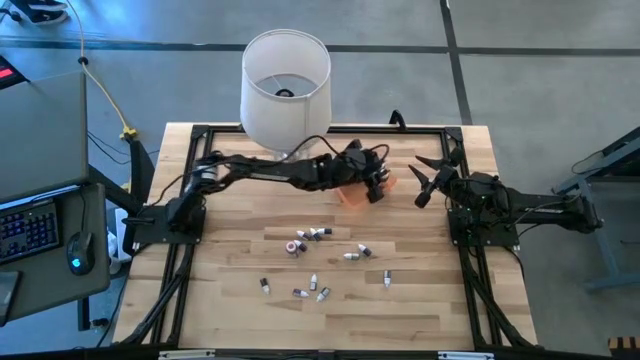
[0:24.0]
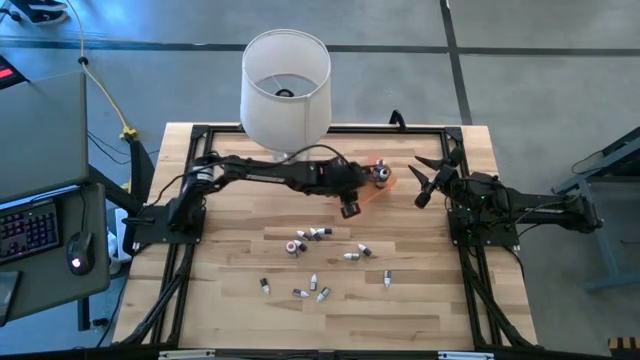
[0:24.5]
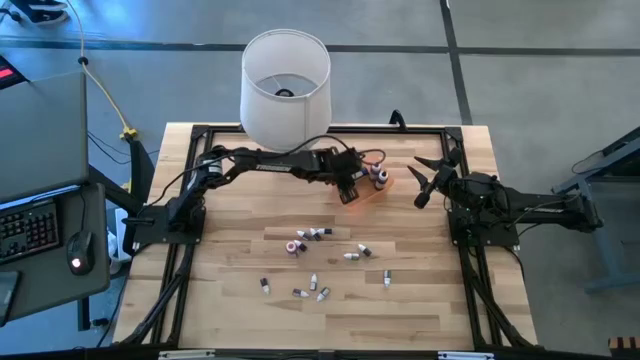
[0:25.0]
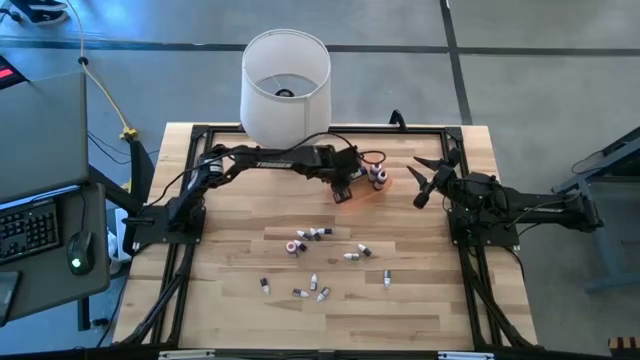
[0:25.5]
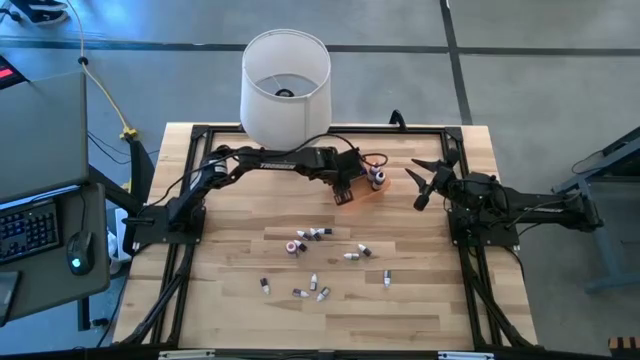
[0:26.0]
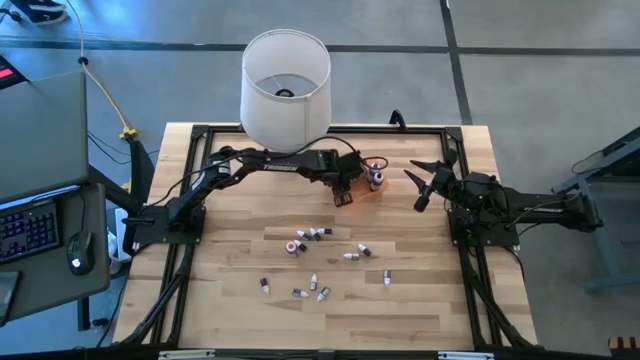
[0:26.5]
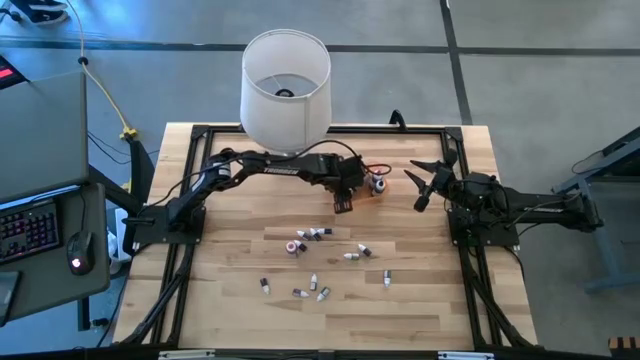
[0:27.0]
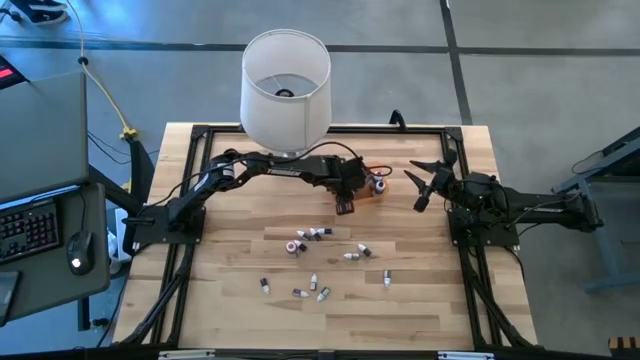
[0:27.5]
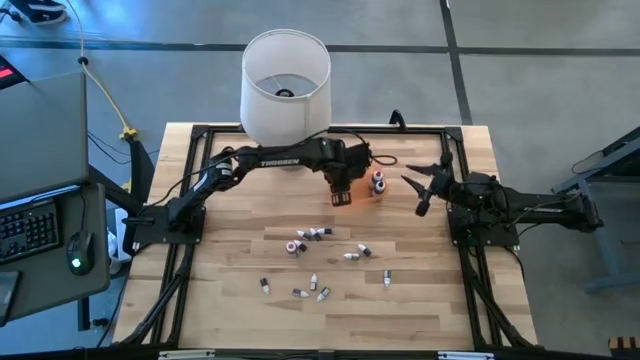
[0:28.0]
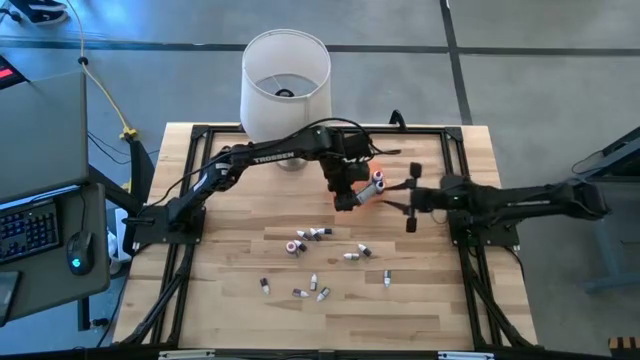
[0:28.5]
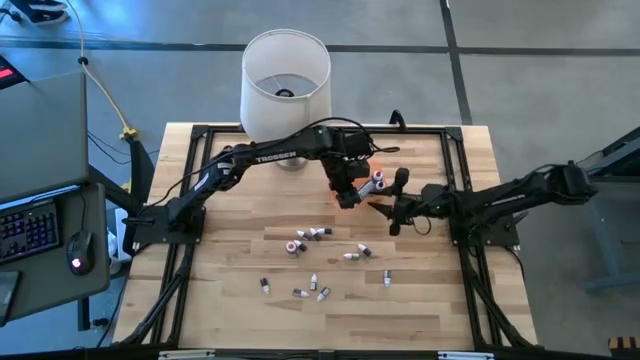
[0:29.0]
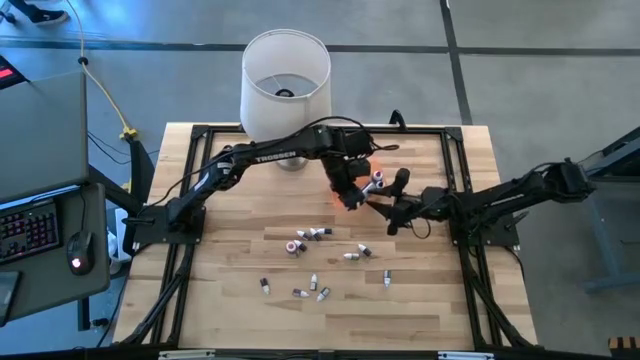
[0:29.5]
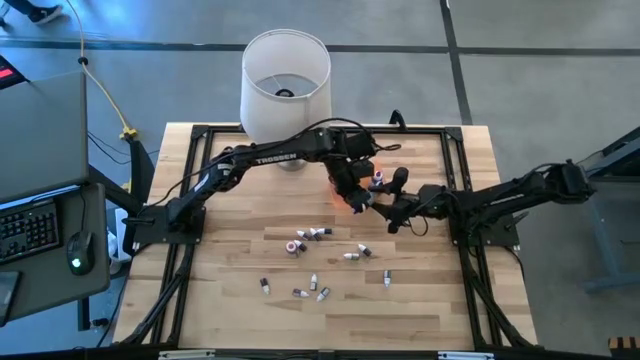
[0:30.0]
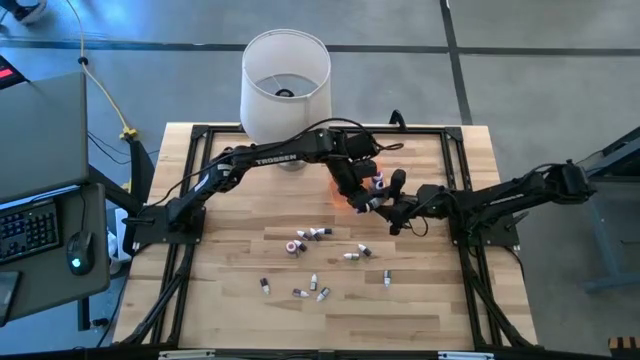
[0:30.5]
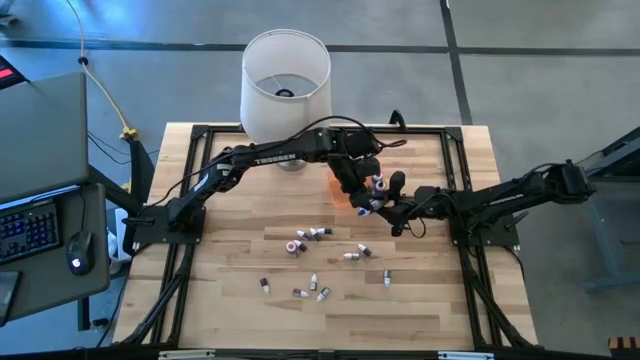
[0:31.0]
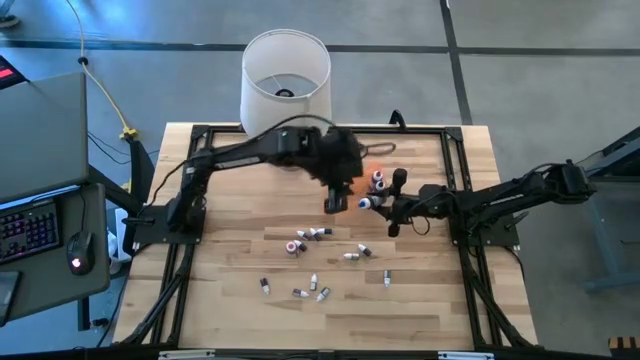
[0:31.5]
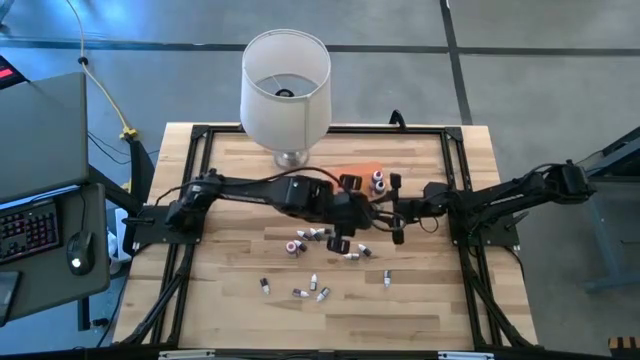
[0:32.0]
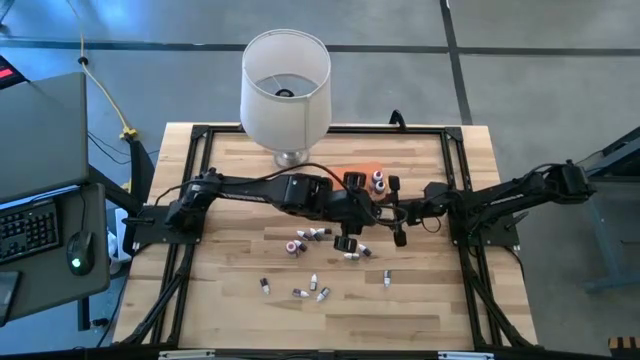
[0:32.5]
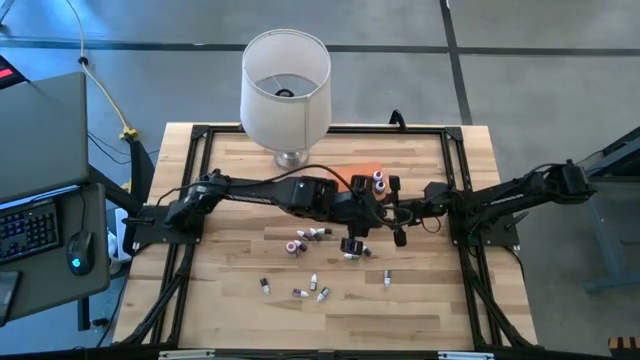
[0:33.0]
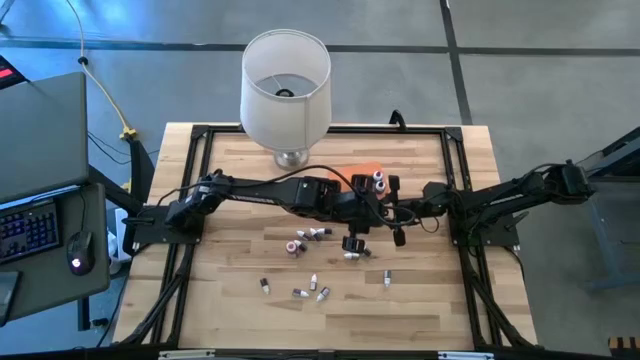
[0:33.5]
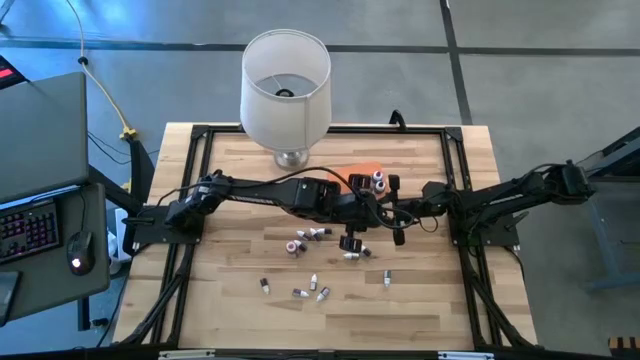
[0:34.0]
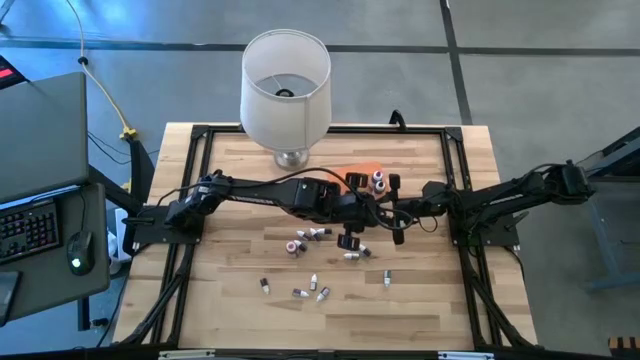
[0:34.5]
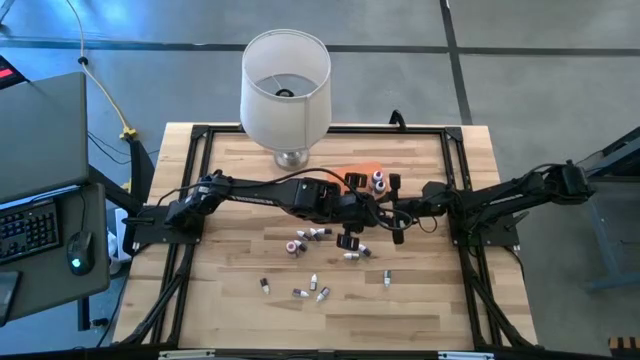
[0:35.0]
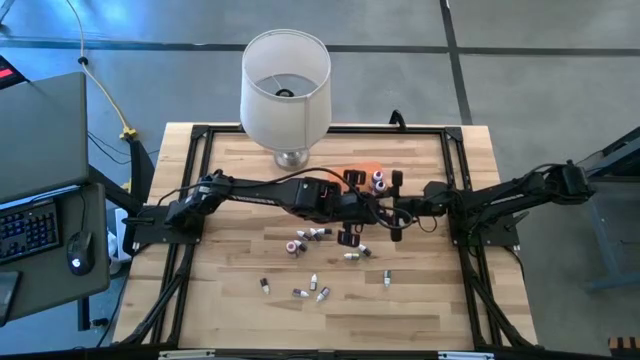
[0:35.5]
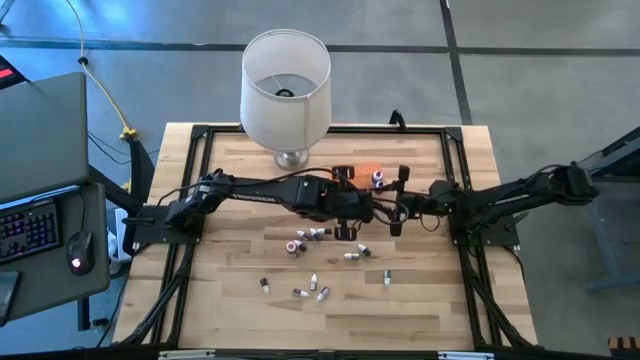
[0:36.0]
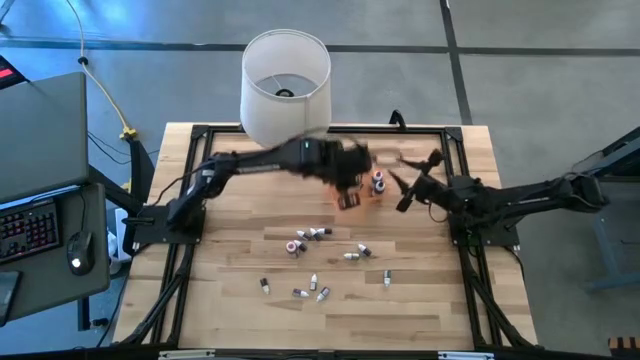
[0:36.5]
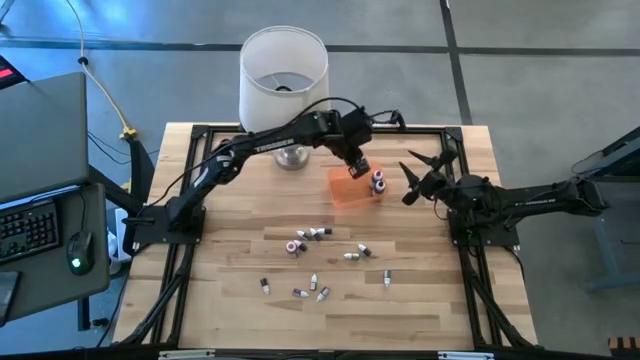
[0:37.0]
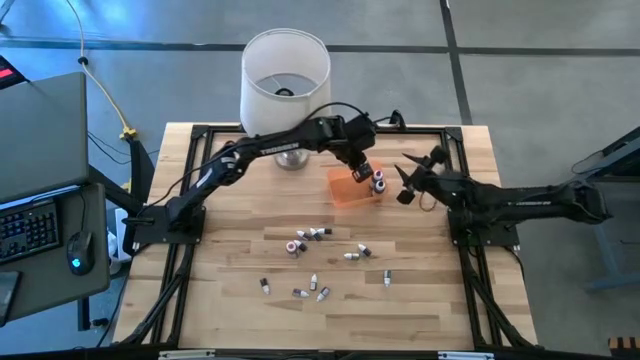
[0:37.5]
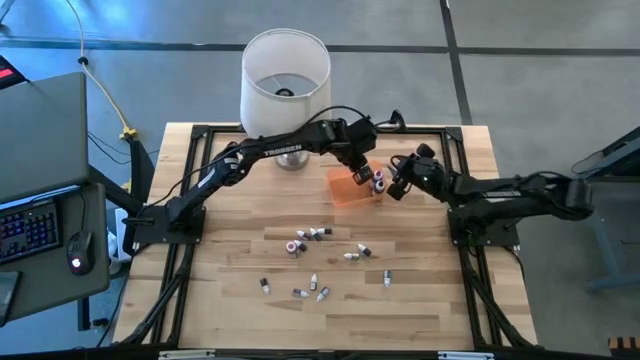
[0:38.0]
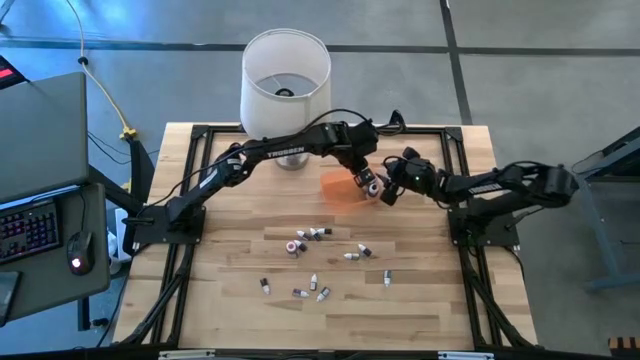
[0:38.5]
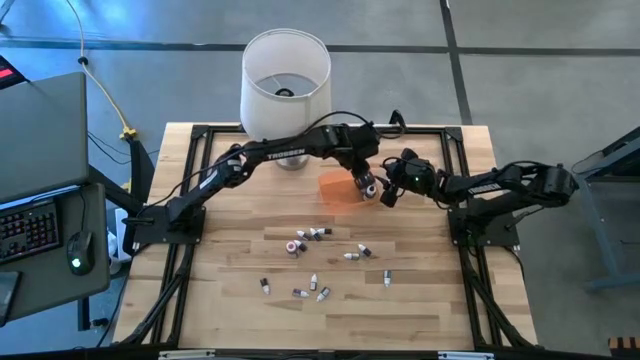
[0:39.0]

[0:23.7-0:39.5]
Task: Pick & Place food coloring
Adjust the large blue food coloring bottle in the orange bin

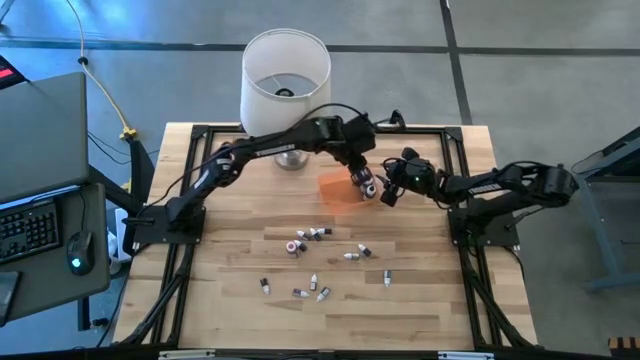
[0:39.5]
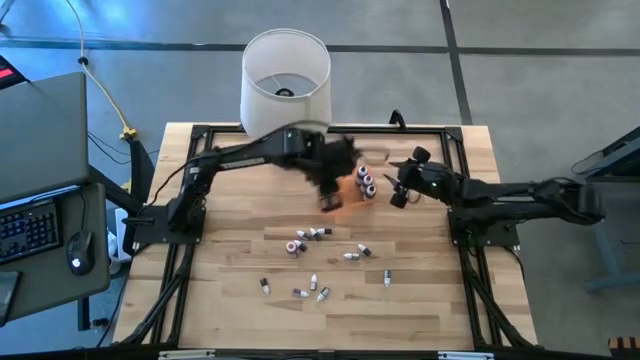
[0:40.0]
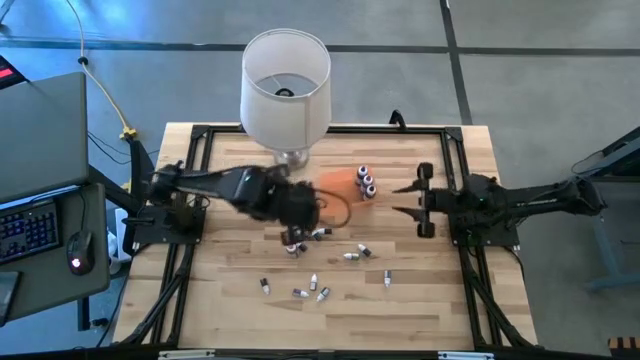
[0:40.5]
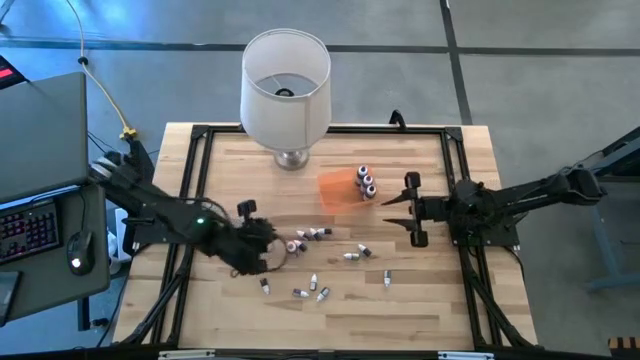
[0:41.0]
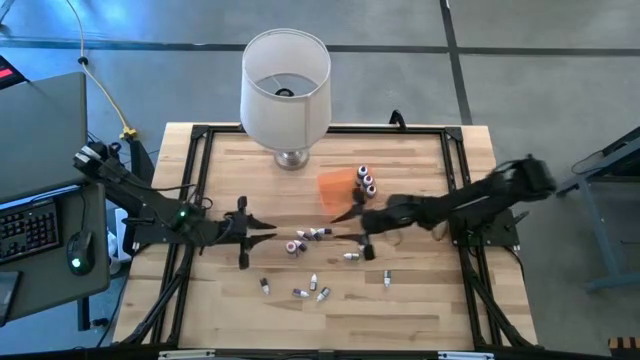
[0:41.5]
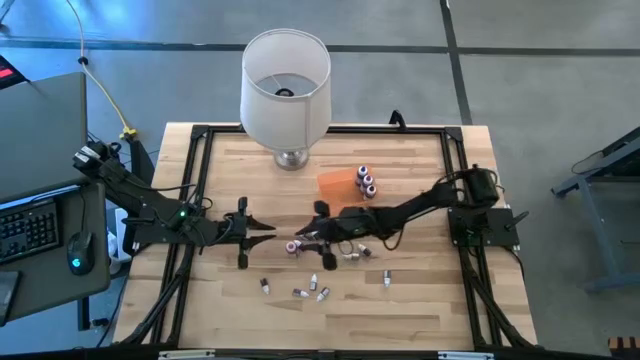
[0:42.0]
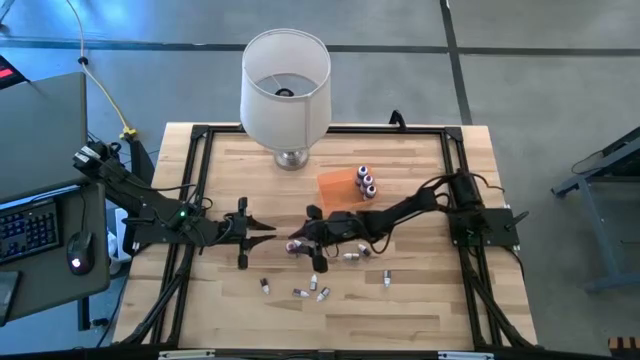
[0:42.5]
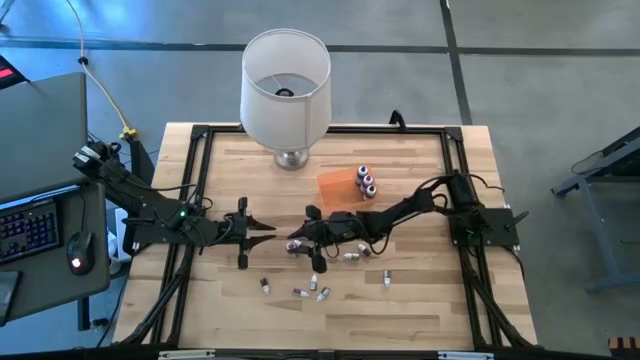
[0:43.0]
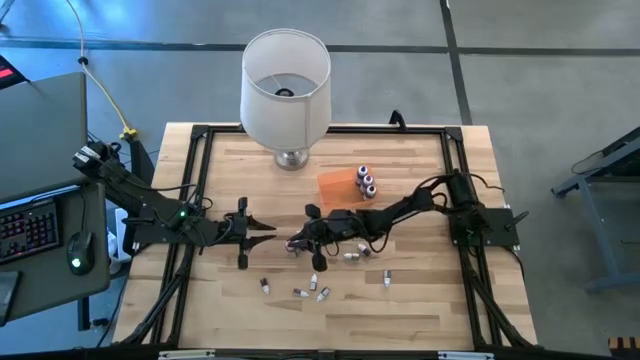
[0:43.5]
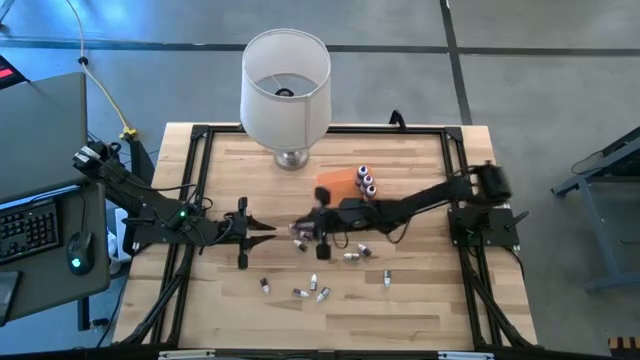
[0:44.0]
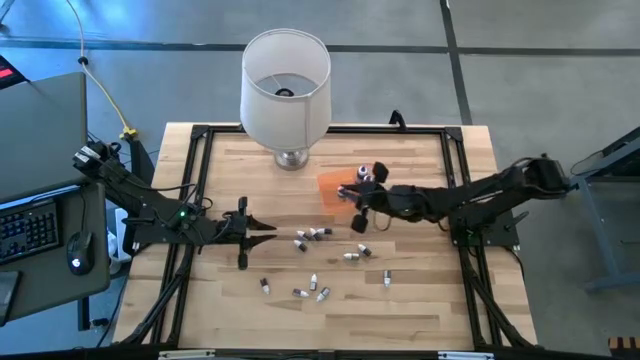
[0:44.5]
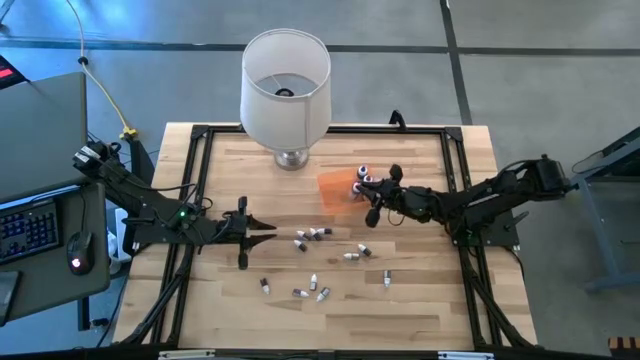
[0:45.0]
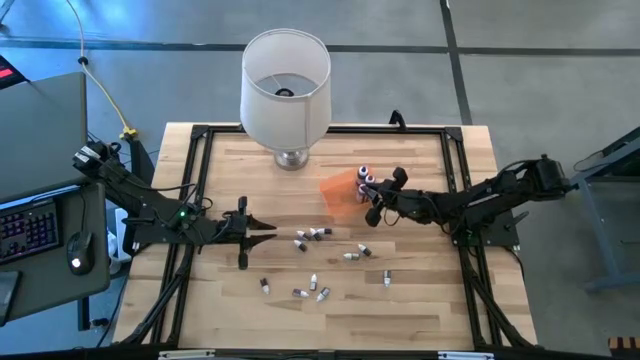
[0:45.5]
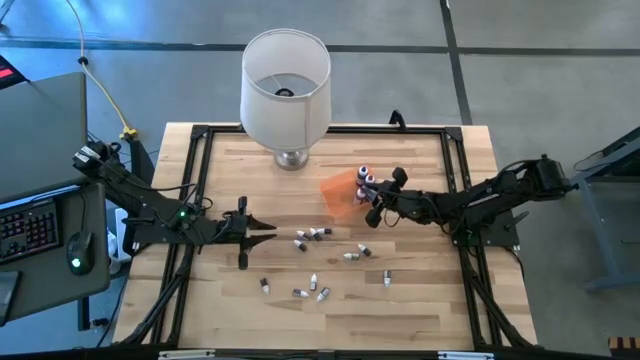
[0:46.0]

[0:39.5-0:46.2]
Put the large pink food coloring bottle into the orange bin
